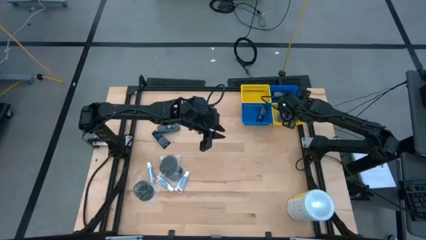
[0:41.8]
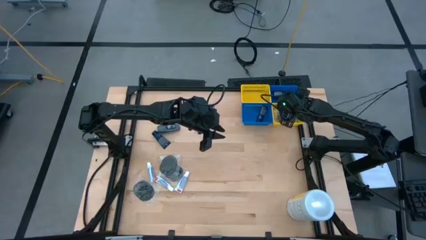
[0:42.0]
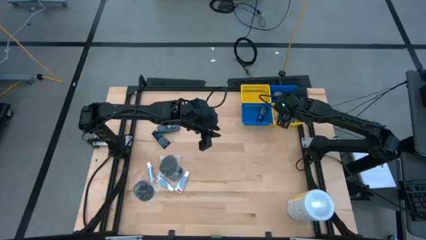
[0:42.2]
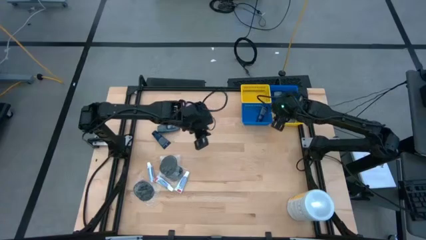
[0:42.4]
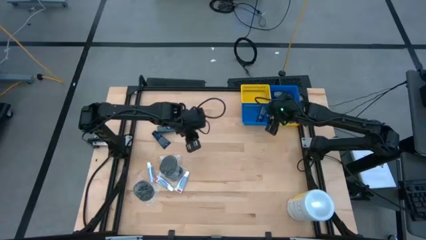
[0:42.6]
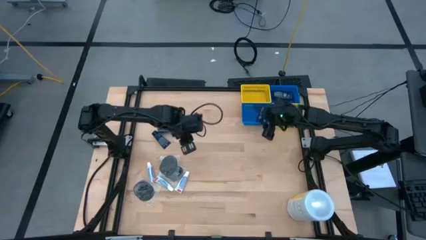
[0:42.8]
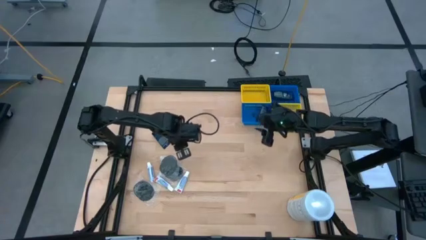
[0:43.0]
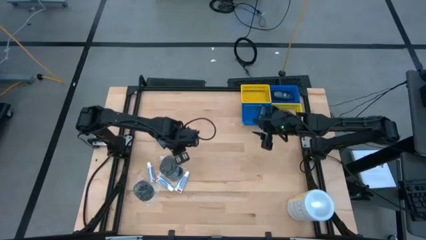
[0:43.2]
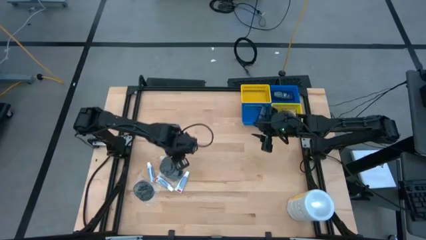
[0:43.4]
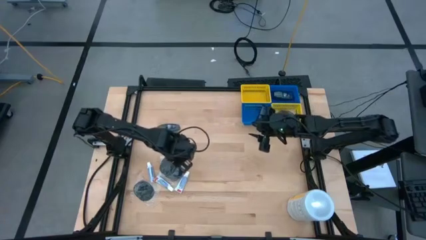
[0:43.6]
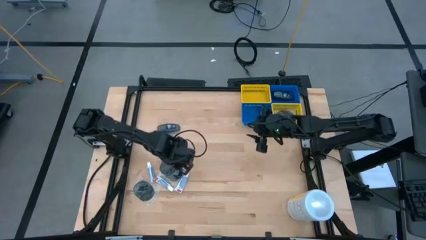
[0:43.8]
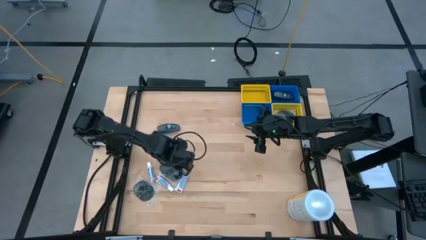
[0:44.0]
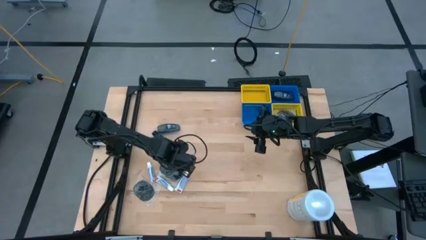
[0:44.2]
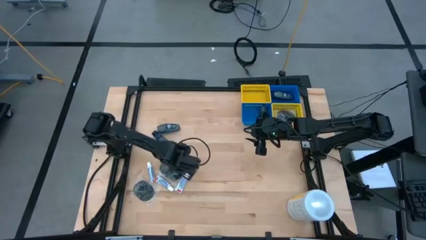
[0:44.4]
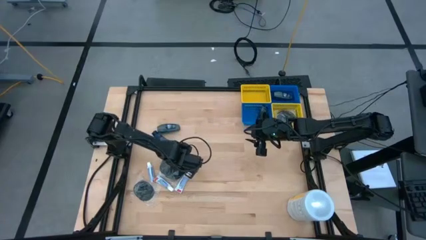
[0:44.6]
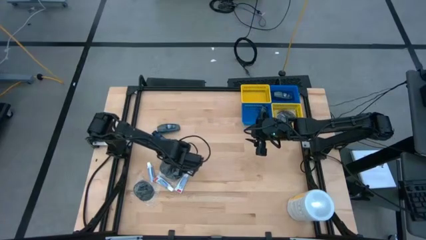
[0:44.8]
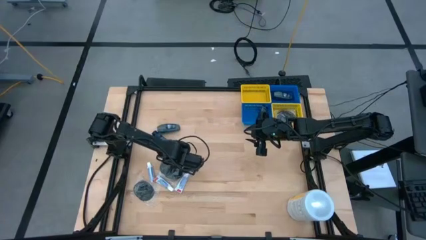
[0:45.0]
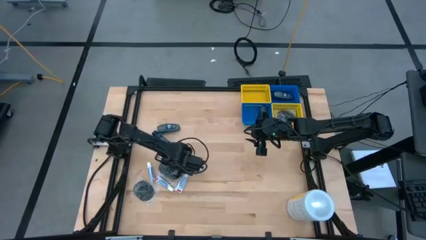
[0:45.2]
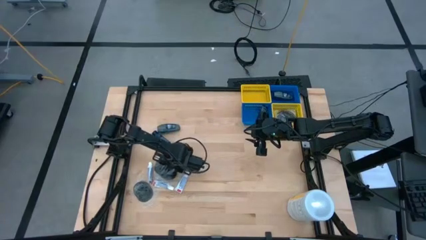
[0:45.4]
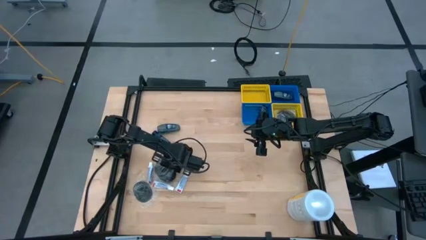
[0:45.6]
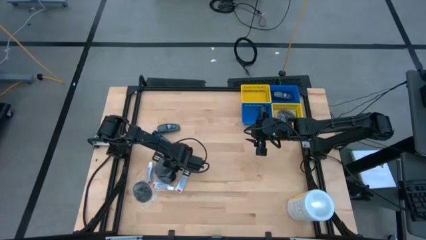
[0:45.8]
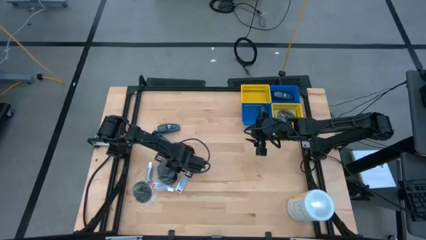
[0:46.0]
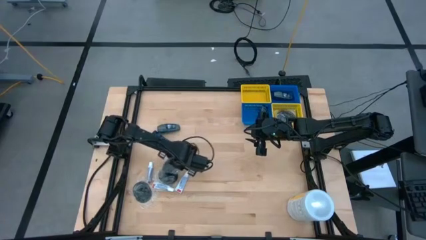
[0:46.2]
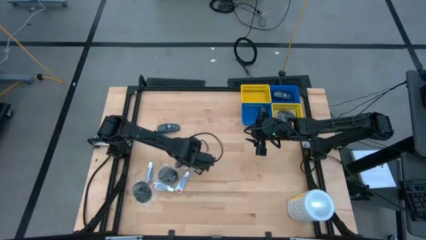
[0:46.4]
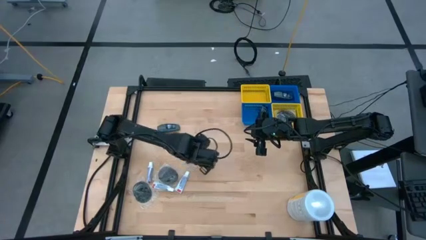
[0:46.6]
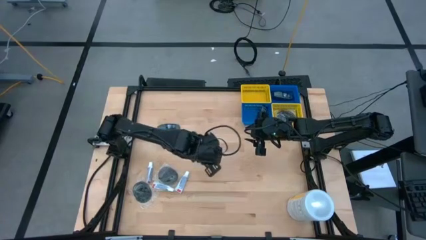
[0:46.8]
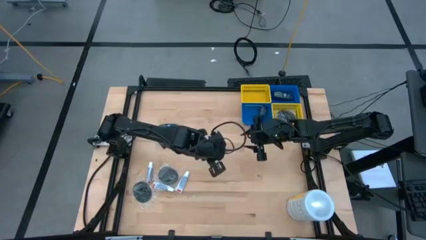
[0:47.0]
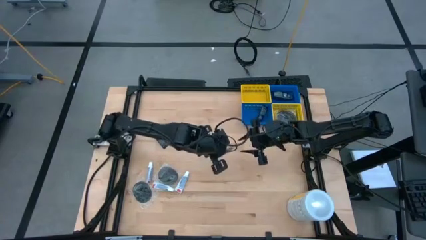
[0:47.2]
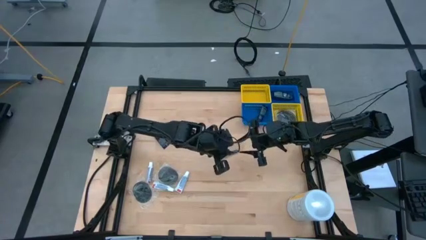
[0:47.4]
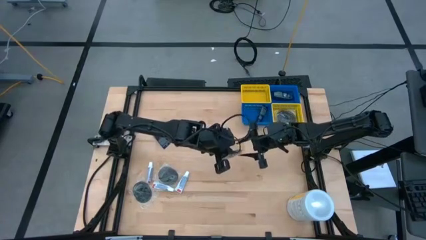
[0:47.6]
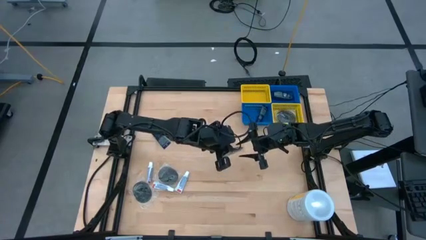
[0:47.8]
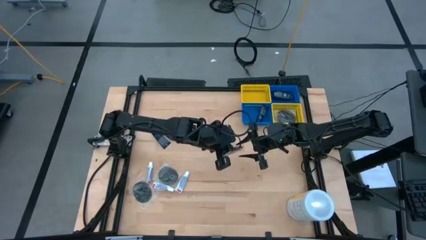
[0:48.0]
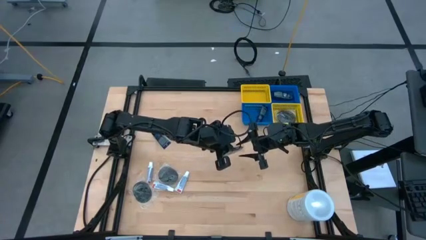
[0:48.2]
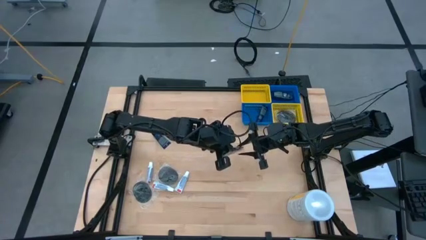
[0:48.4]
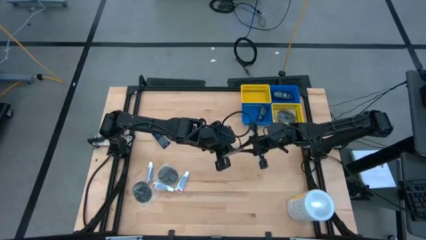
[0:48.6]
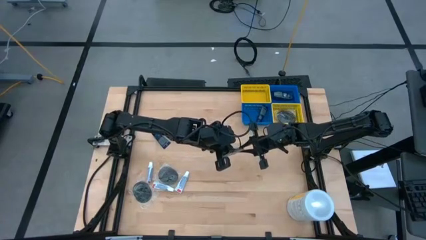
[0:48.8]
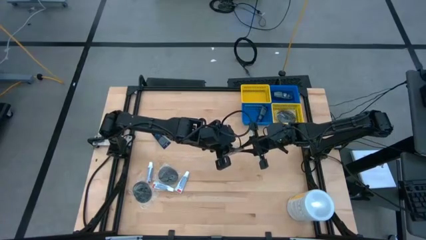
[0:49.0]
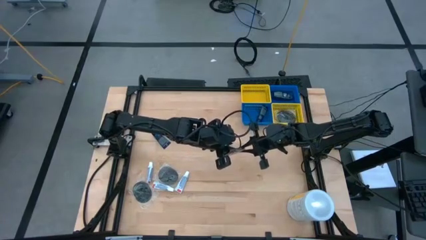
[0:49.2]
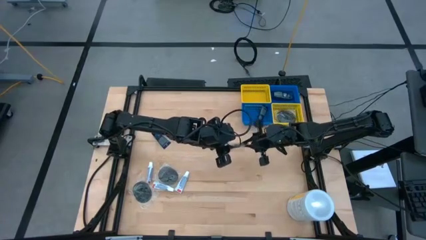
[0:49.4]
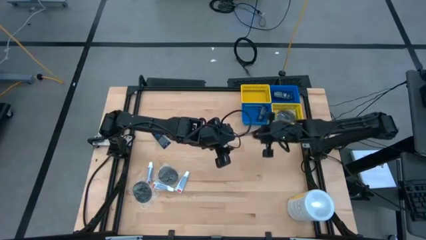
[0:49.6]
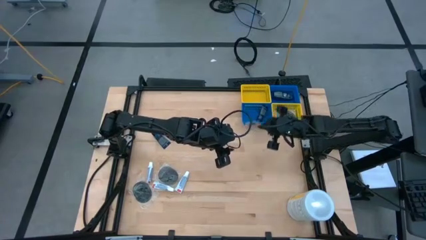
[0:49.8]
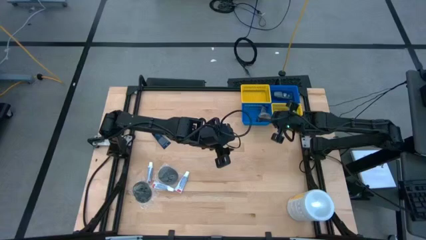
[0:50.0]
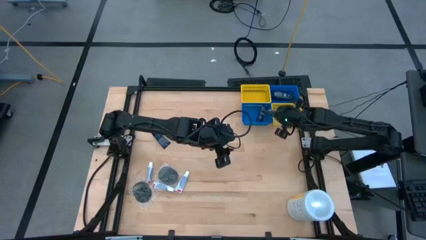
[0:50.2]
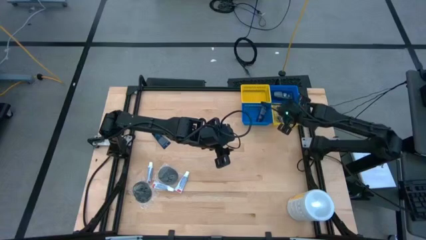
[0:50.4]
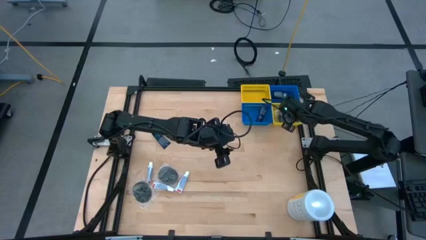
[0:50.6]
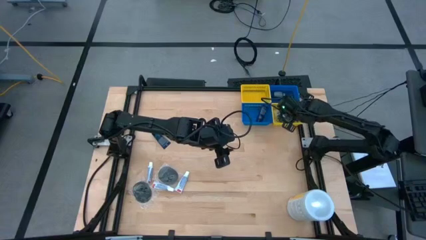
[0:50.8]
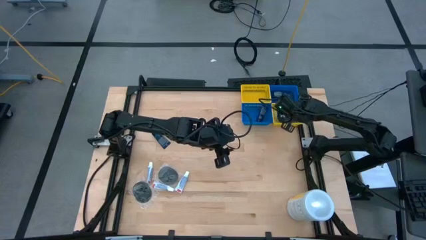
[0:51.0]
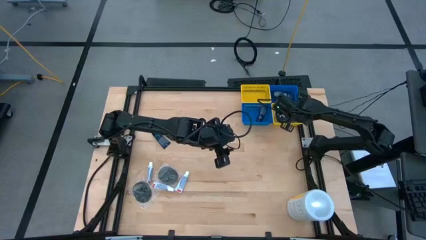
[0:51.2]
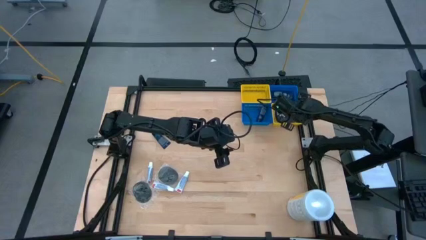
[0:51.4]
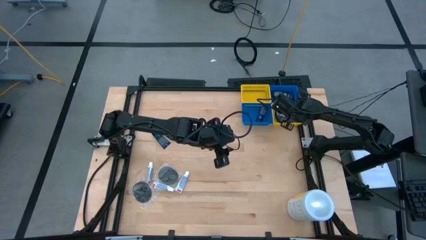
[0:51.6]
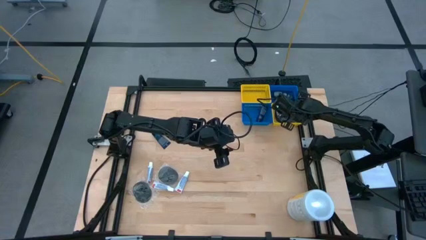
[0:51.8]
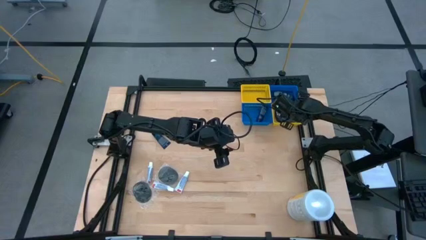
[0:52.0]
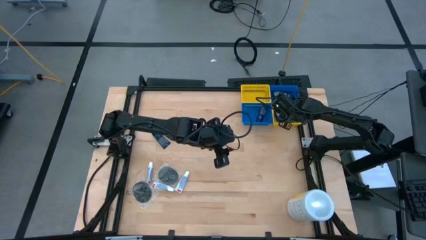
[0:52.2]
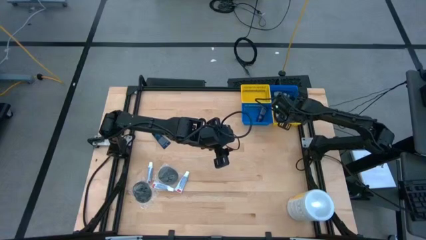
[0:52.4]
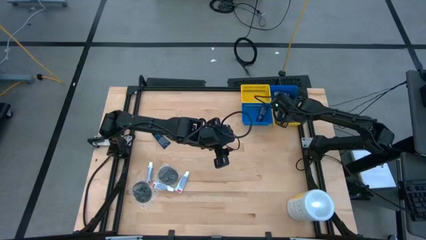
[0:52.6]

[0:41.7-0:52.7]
Task: Pick & Place Travel size toiletries
Put the black hairbrush into the bottom yellow basket
